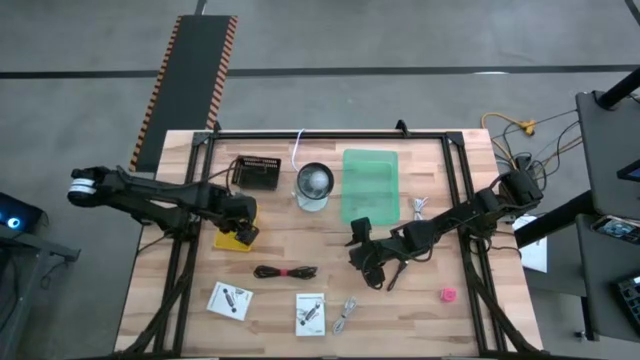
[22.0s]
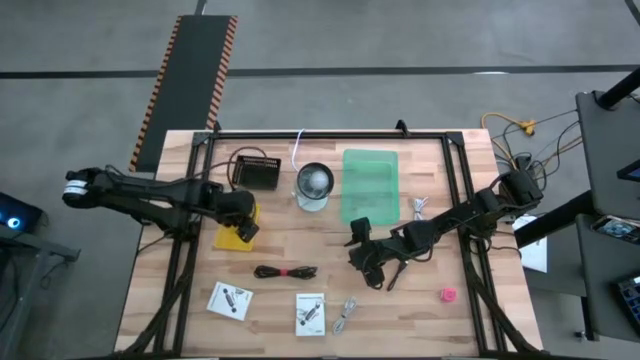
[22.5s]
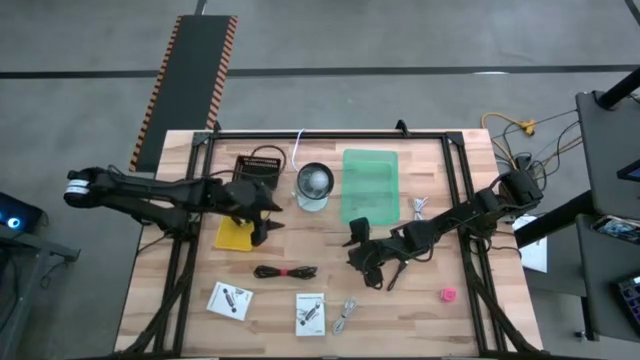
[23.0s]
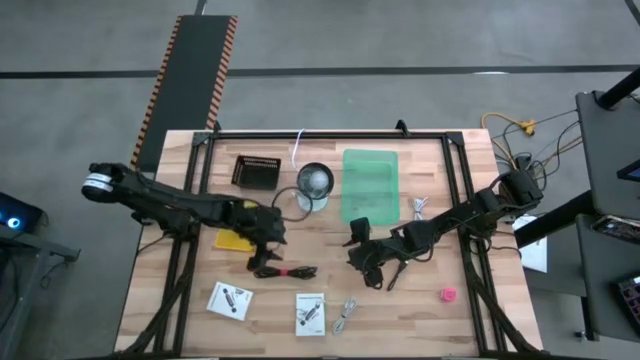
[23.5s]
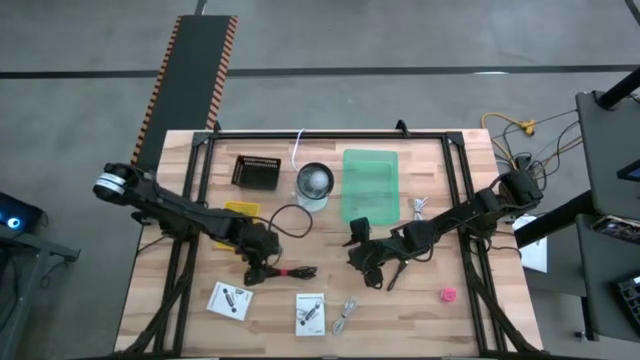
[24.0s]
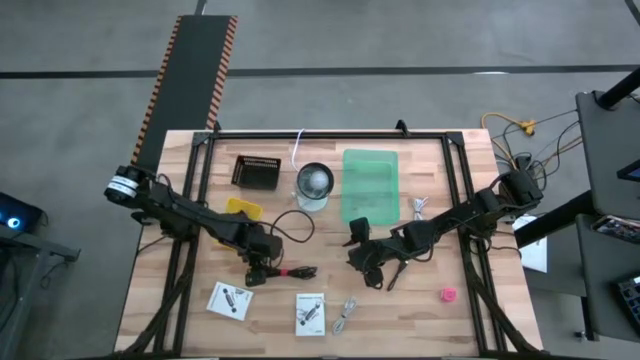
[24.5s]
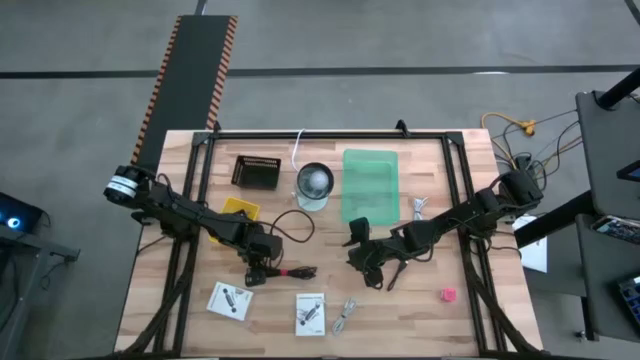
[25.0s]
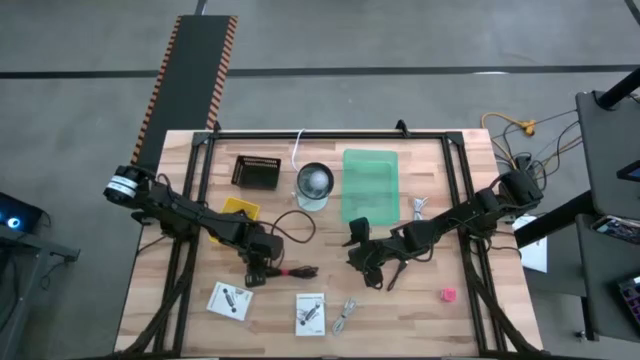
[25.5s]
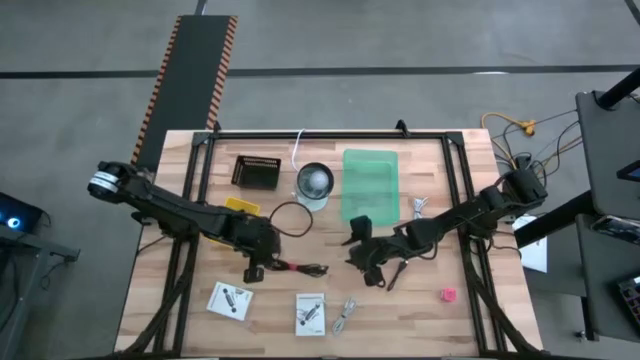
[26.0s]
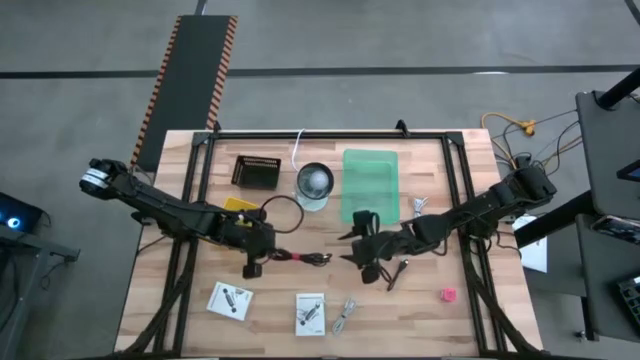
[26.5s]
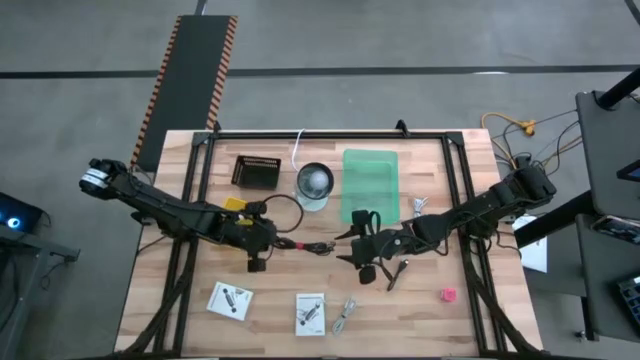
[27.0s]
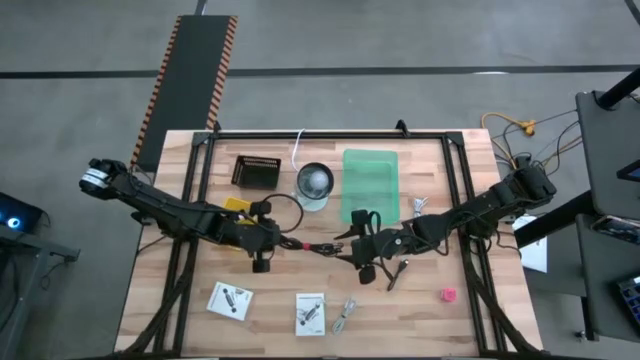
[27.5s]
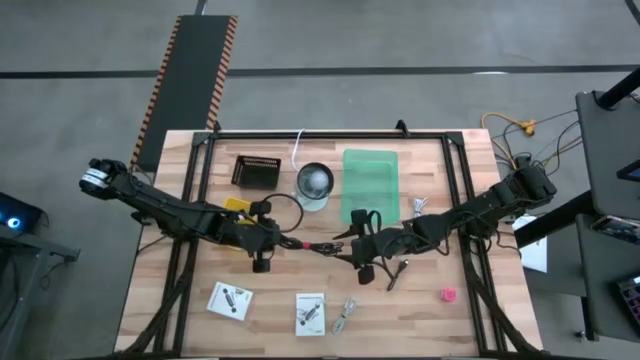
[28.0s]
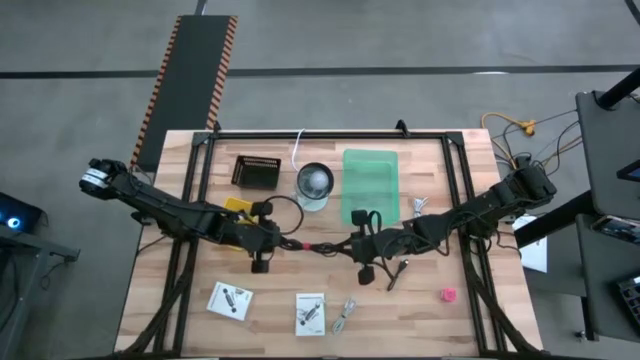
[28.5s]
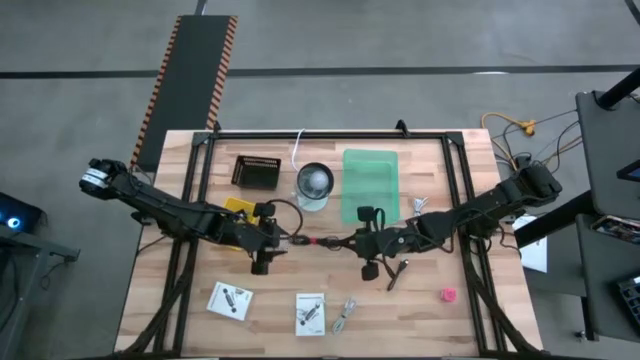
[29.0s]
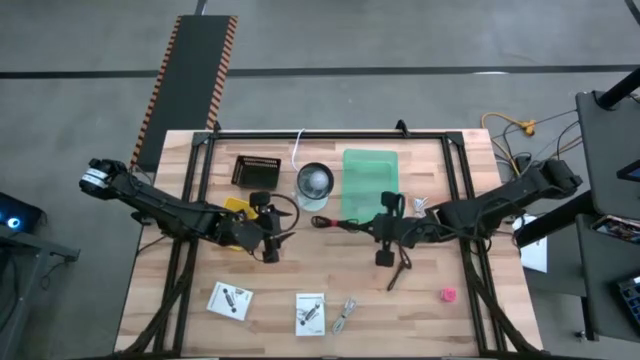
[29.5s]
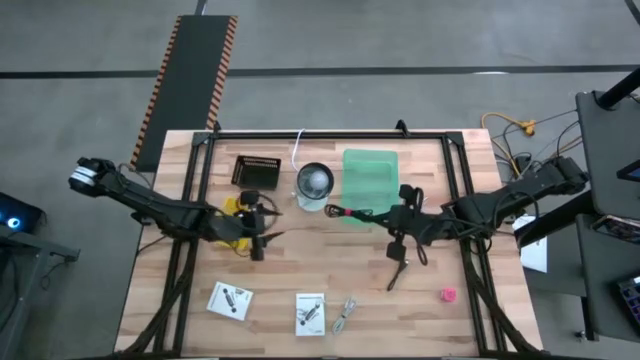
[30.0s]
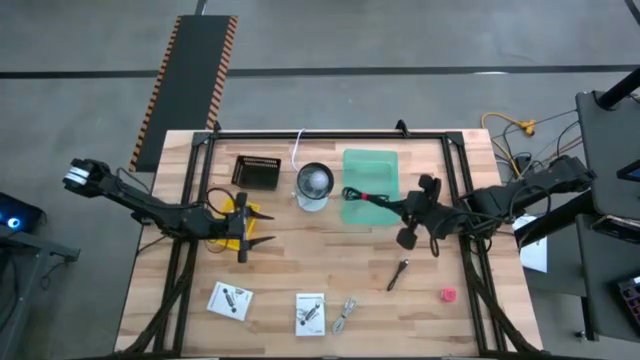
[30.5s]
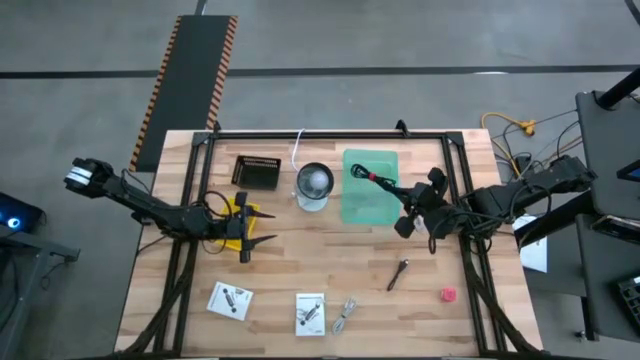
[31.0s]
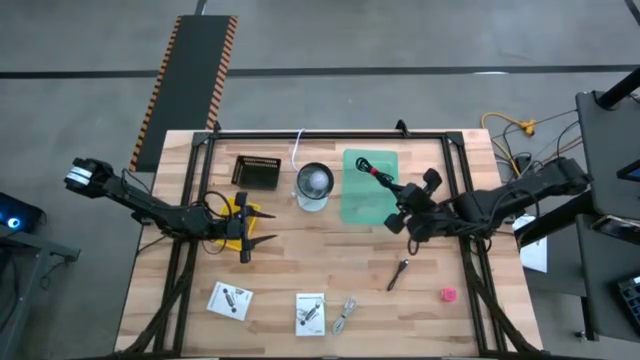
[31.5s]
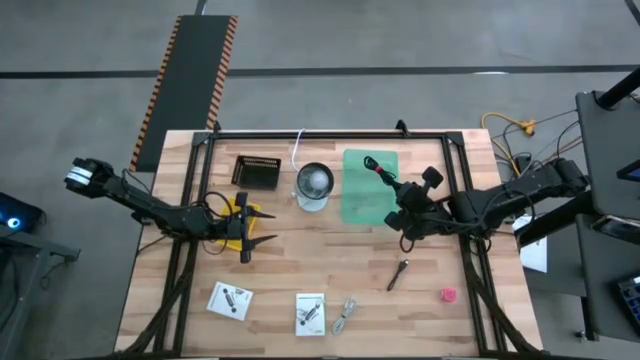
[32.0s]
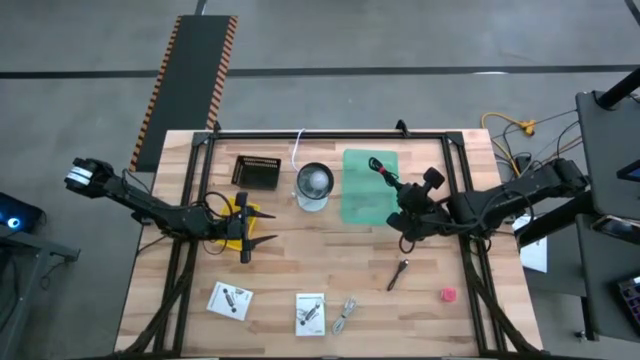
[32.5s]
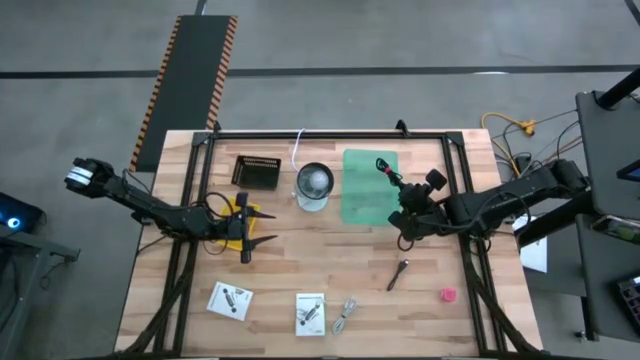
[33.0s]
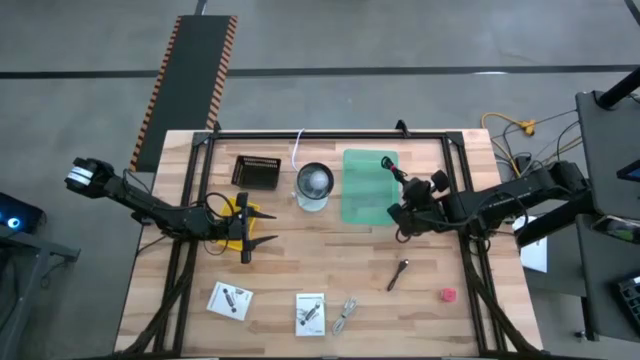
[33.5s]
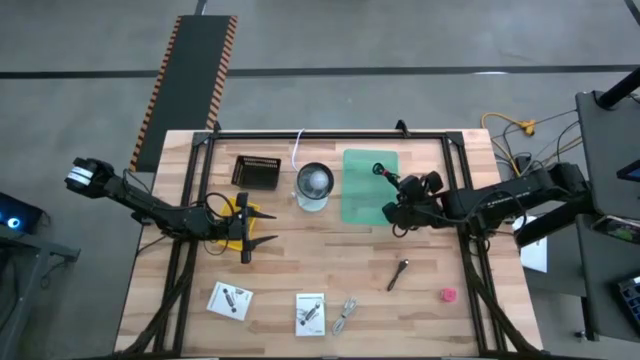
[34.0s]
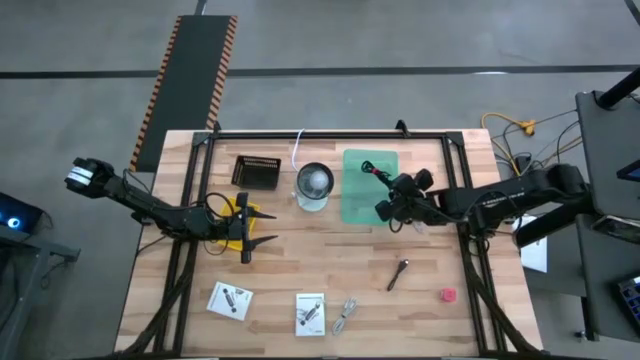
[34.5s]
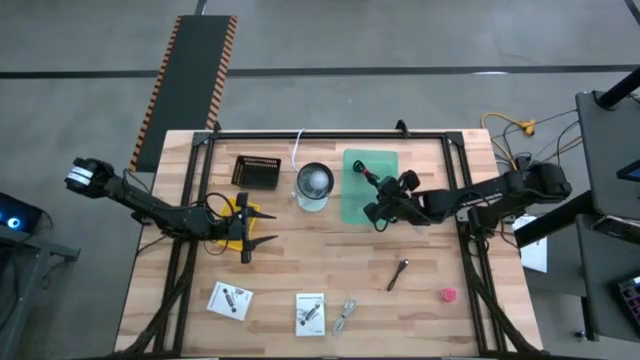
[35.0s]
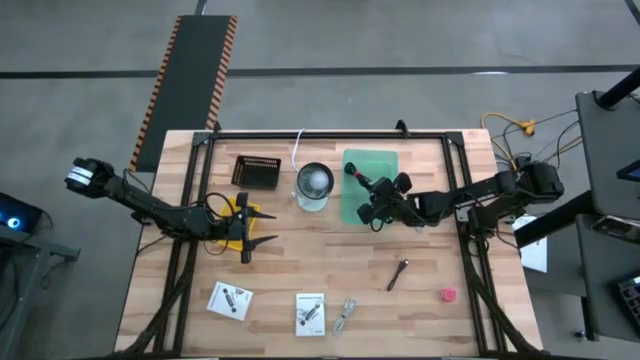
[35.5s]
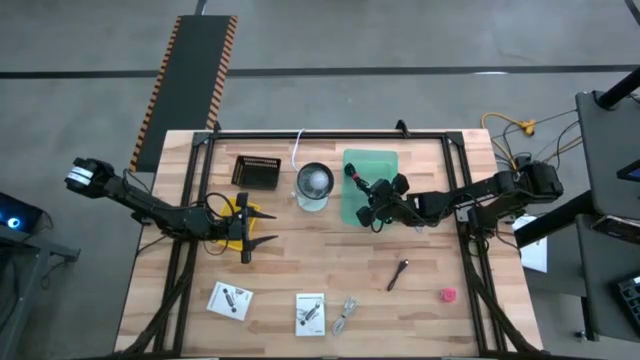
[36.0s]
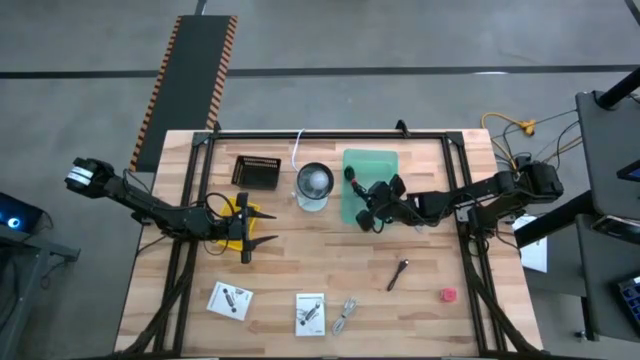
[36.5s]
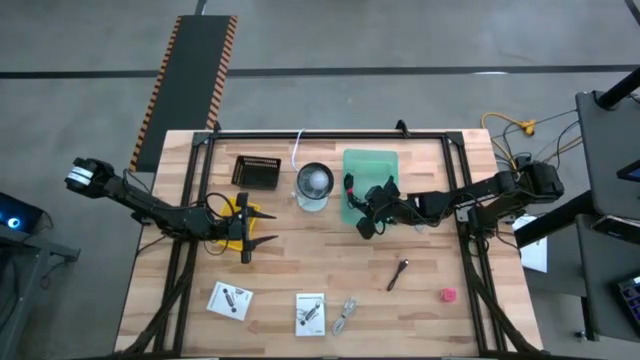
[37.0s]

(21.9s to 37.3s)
Task: Pick and place items into bin
Put the left black charger cable into the green bin

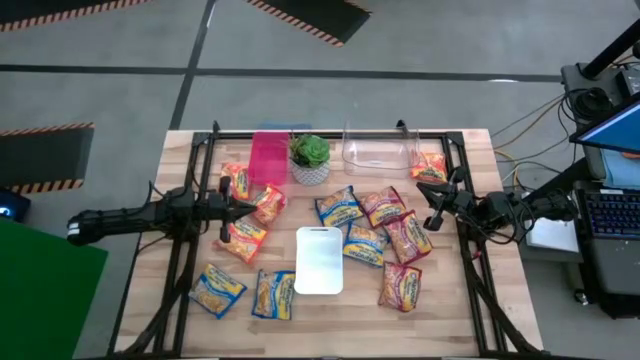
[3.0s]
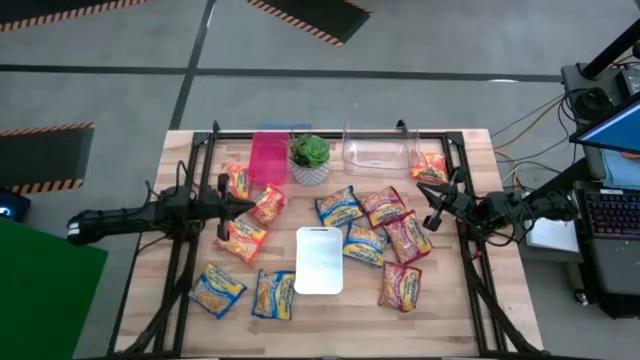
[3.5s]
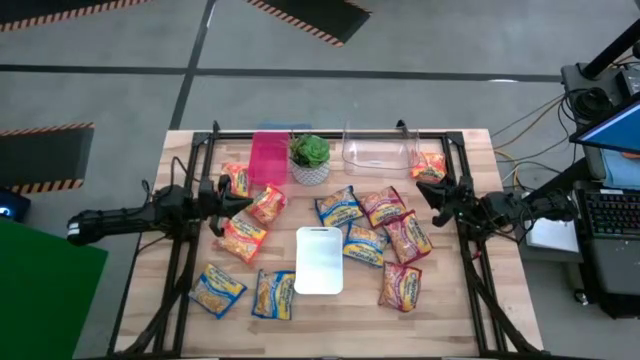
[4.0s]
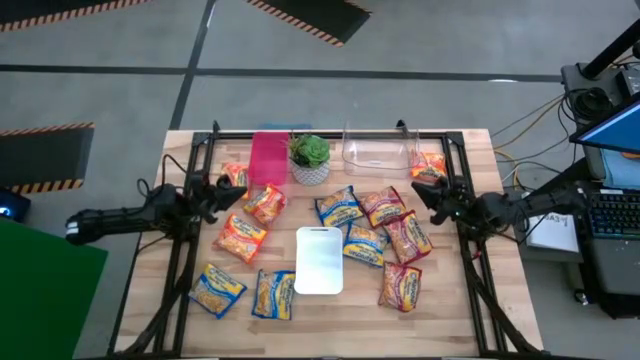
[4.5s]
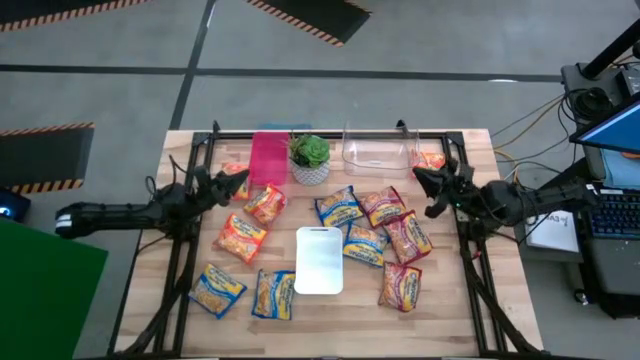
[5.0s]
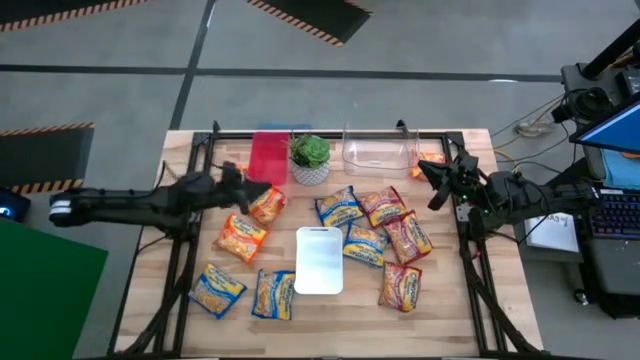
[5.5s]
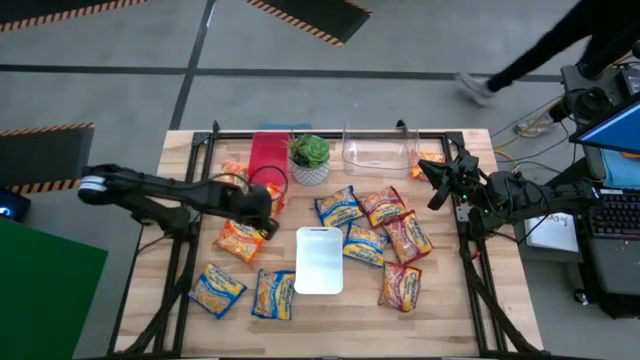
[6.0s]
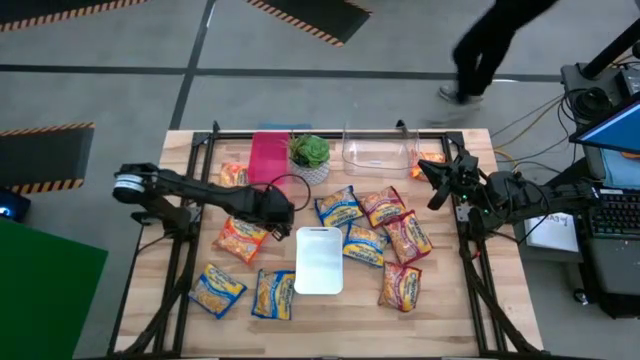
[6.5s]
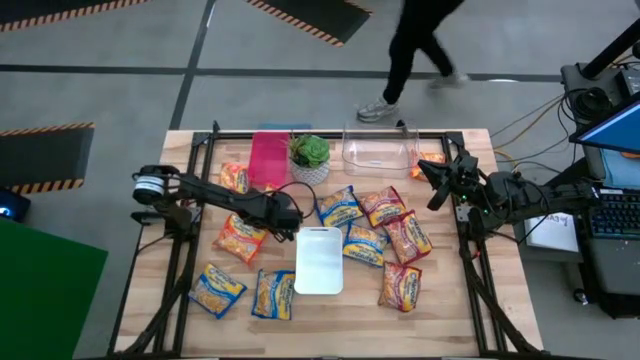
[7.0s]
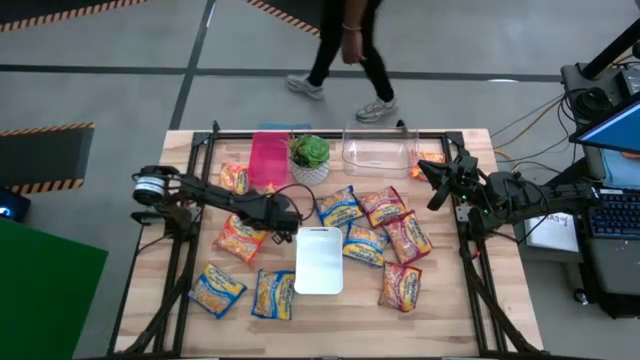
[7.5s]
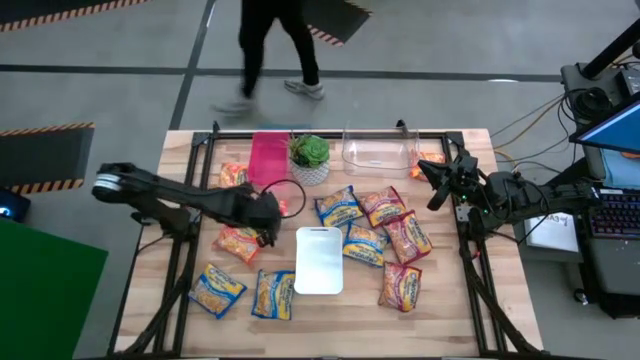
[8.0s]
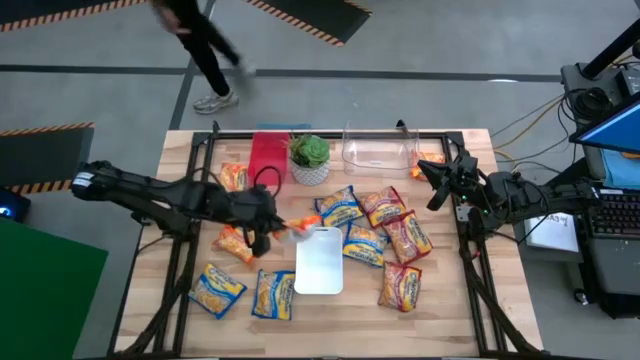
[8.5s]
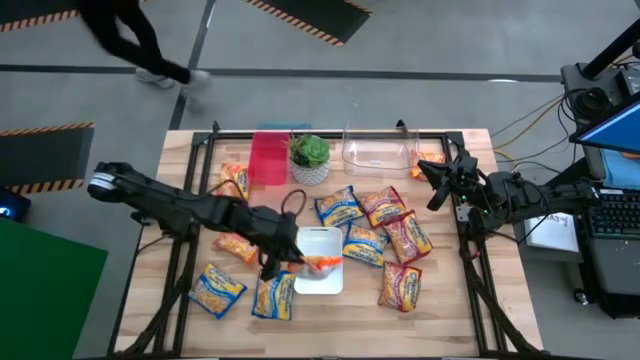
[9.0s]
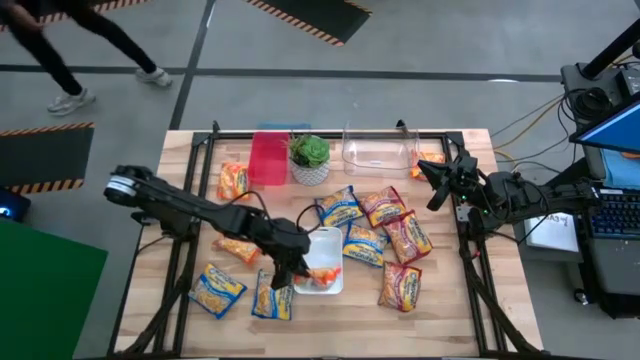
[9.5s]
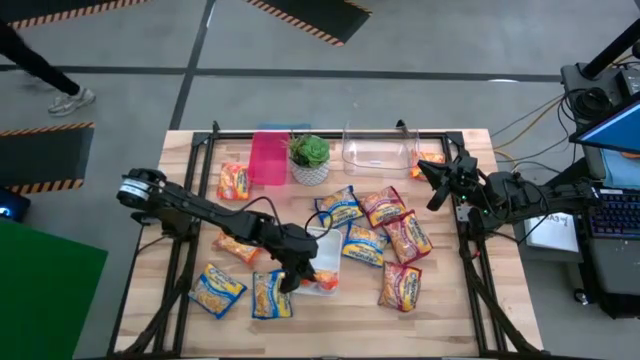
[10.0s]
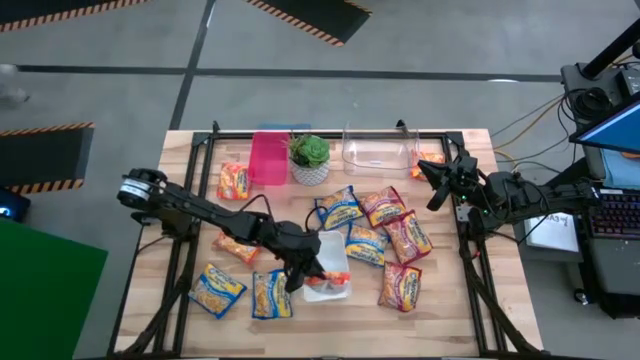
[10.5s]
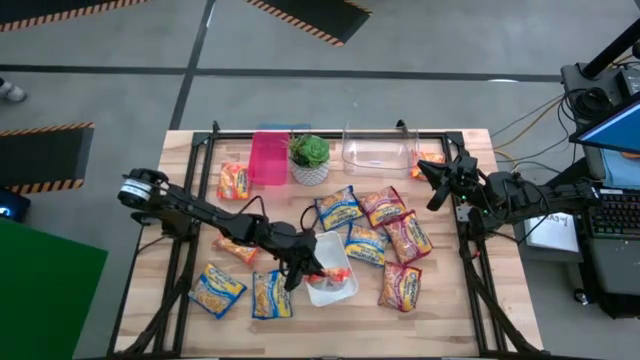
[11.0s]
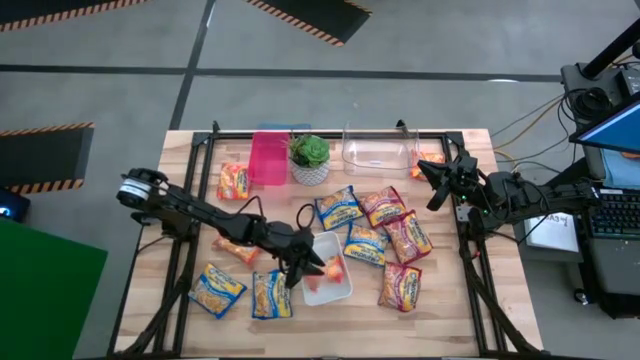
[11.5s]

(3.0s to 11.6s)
Task: Sort Maruchan noodles
Put the orange noodle pack into the white bin
